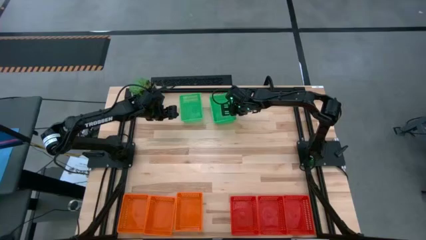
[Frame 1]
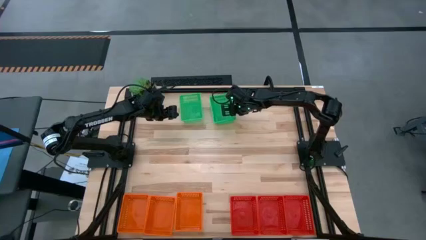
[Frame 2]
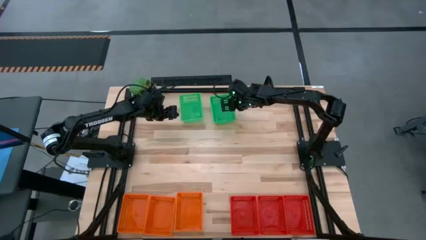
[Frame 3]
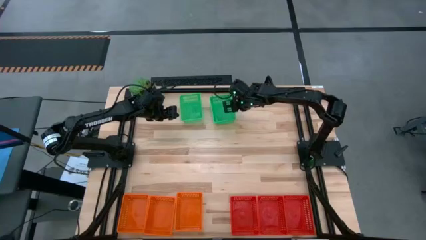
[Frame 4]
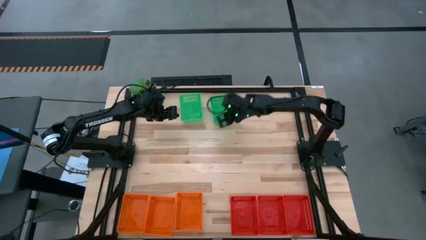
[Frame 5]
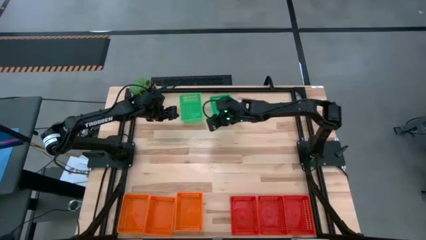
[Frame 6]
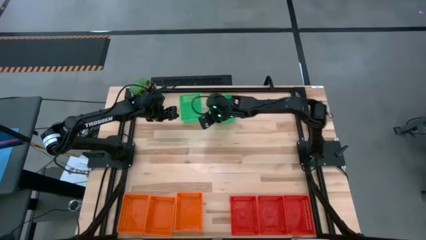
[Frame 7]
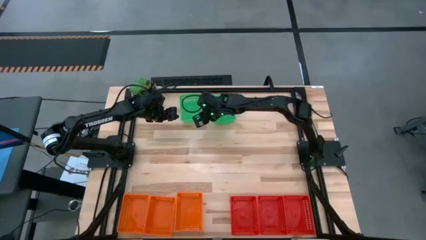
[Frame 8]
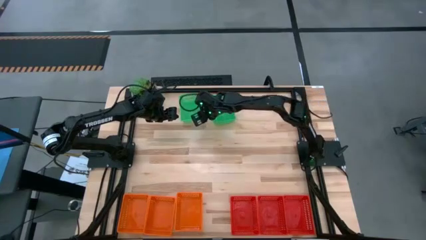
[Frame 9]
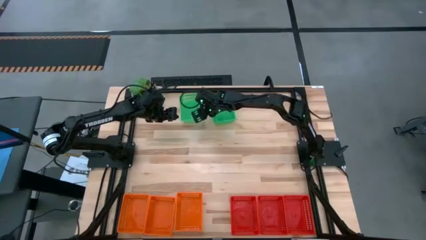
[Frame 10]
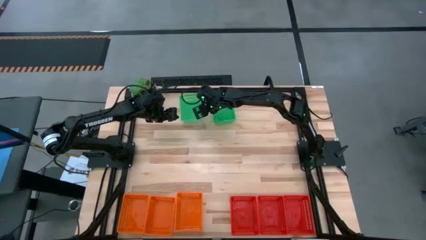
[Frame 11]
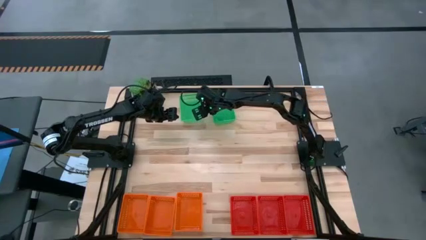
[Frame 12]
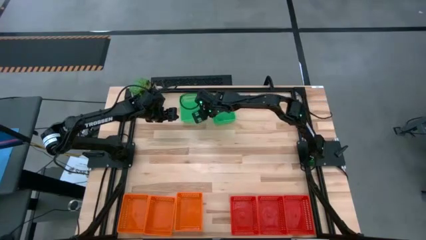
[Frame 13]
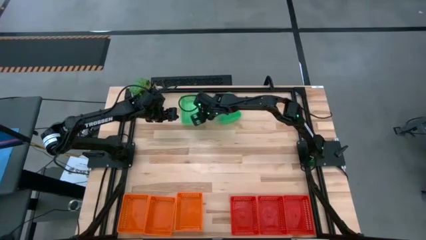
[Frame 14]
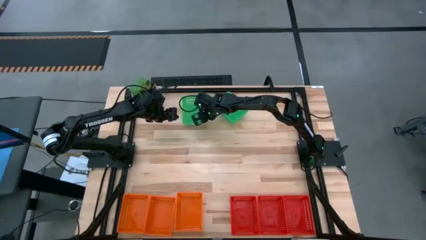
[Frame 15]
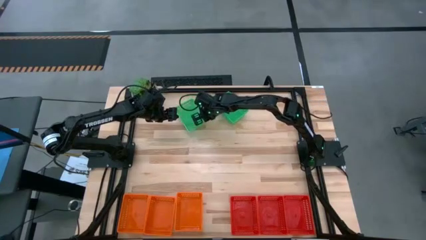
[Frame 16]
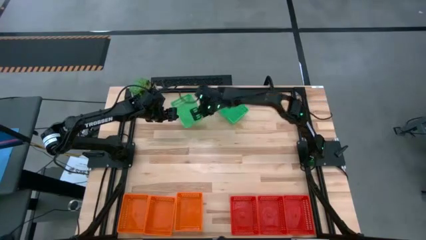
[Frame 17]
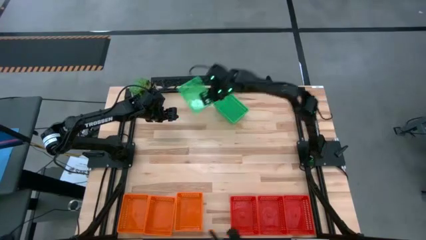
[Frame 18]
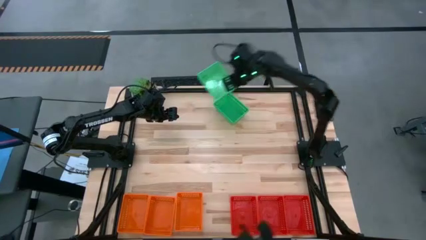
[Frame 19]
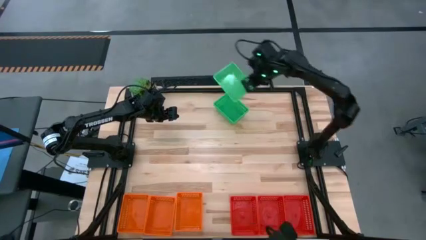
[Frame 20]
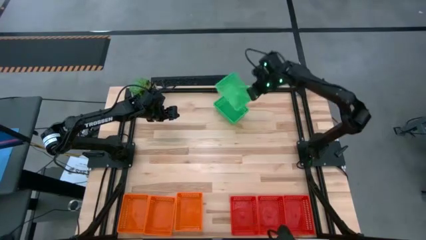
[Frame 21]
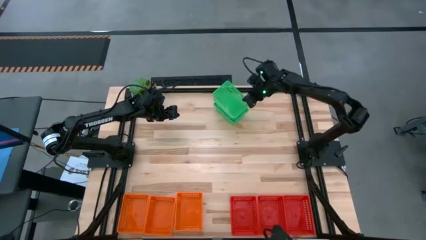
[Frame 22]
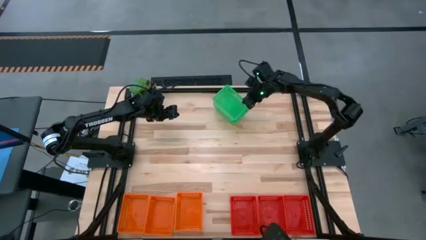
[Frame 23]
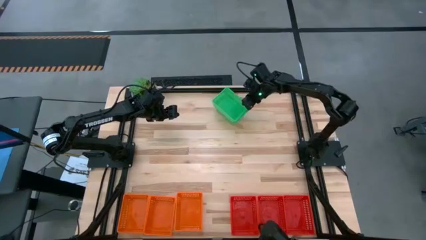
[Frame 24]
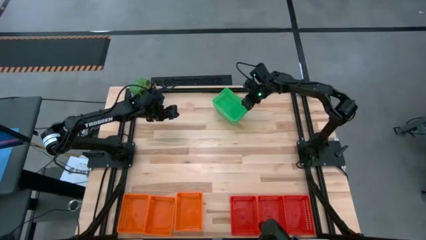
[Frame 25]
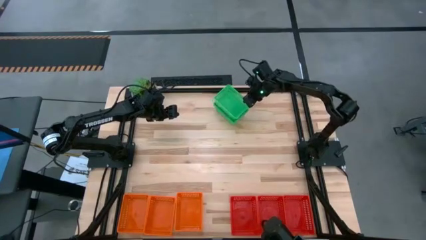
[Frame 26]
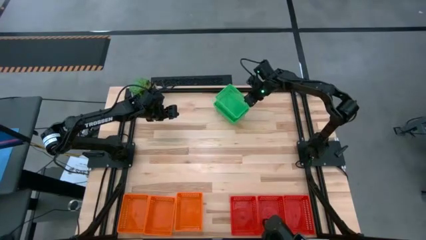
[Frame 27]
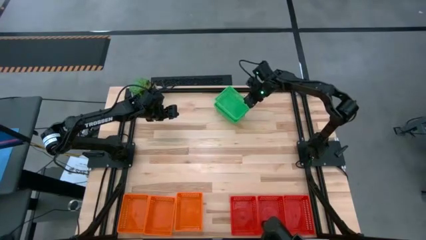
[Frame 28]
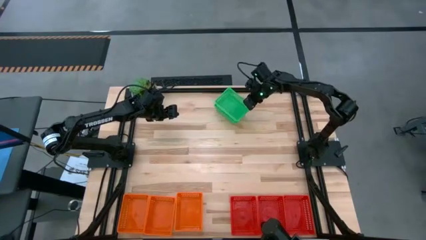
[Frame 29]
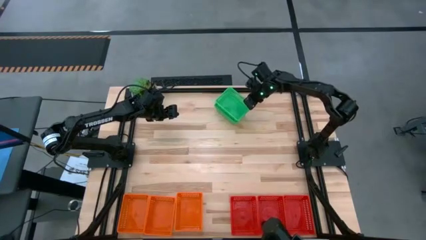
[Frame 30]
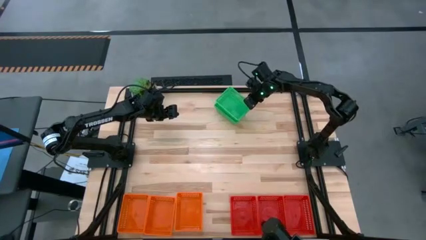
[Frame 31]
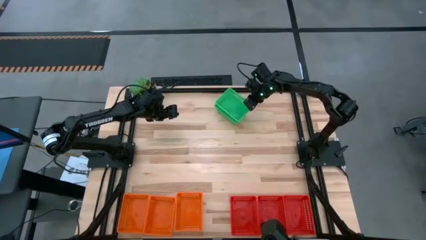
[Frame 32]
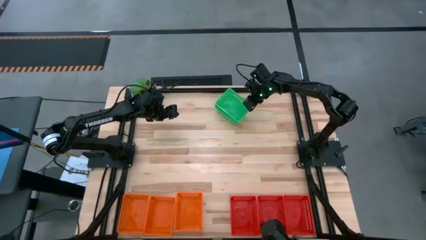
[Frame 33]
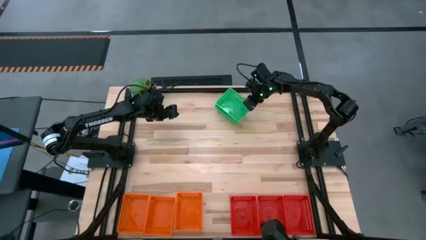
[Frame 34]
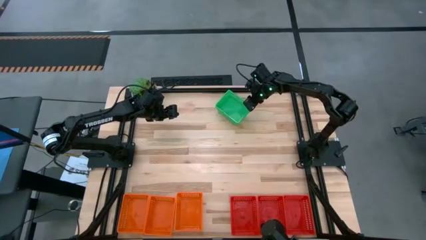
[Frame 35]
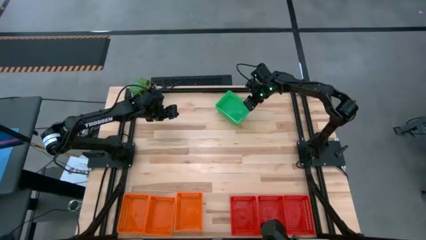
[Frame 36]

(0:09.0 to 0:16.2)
Stack the left green bin on the green bins

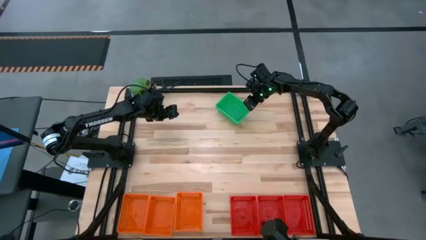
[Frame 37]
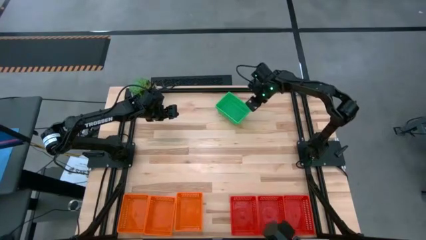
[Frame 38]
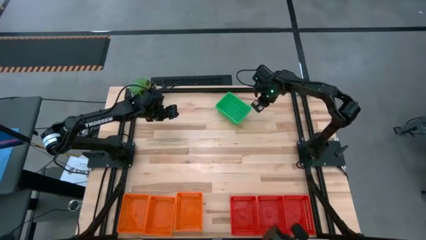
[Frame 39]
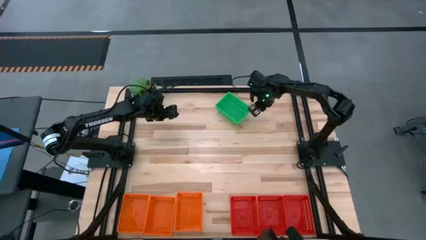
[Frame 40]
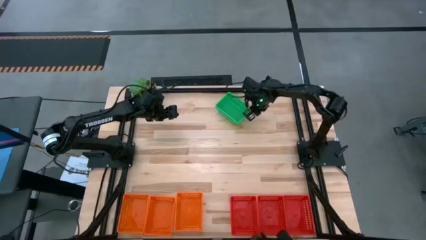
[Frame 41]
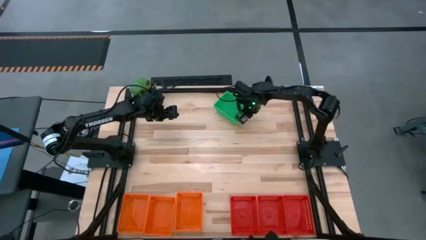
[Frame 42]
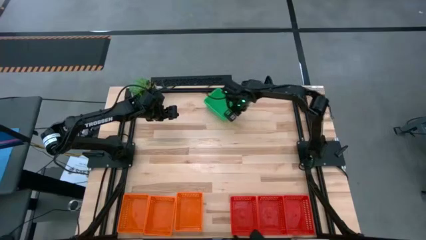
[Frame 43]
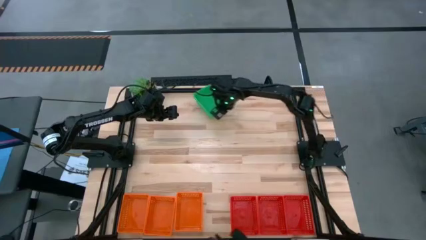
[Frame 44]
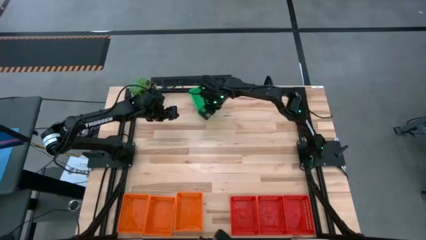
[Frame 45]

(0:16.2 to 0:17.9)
Adjust the stacked green bins

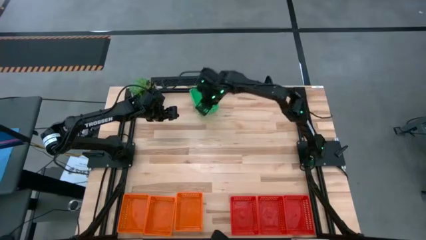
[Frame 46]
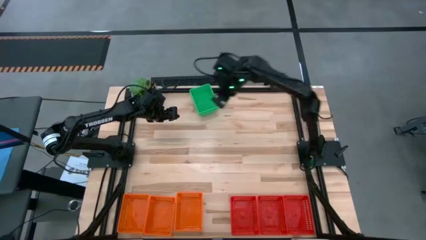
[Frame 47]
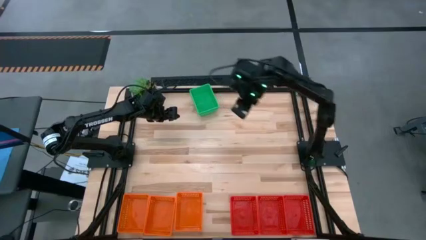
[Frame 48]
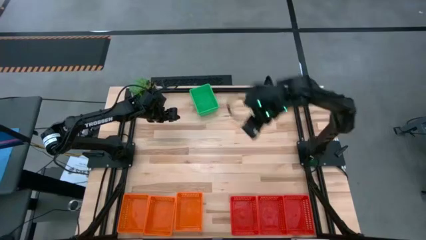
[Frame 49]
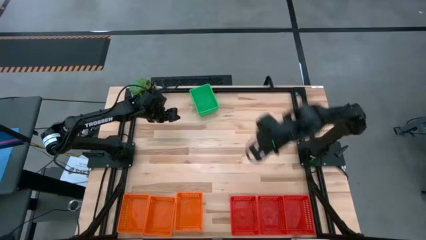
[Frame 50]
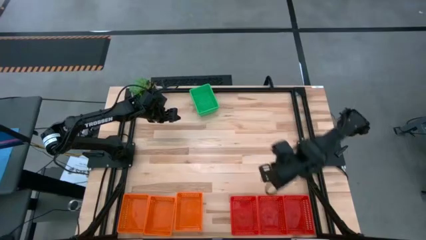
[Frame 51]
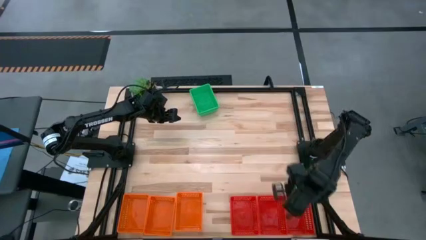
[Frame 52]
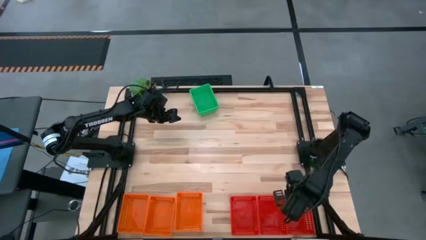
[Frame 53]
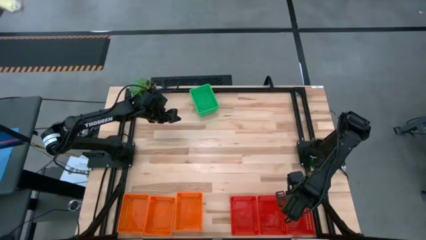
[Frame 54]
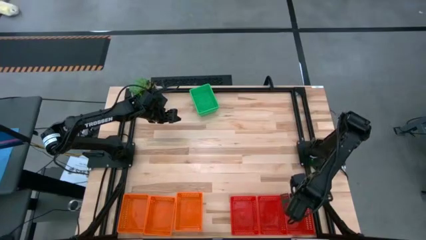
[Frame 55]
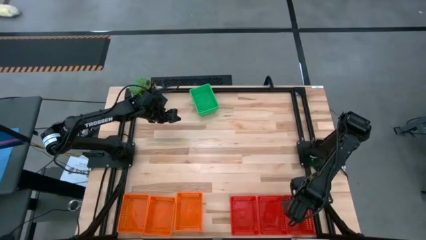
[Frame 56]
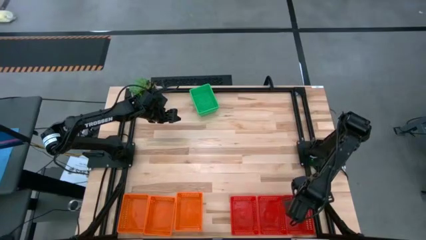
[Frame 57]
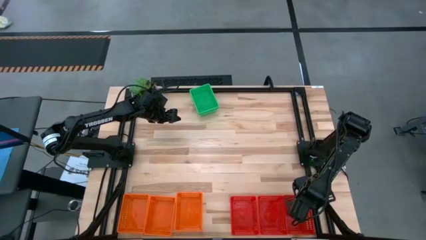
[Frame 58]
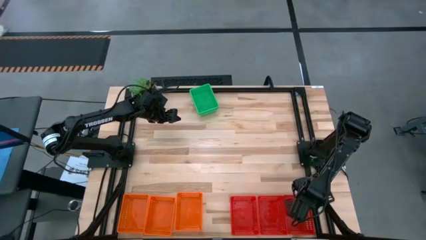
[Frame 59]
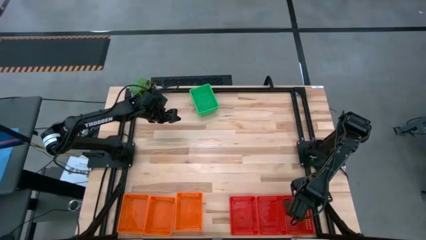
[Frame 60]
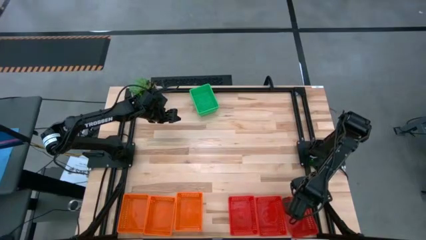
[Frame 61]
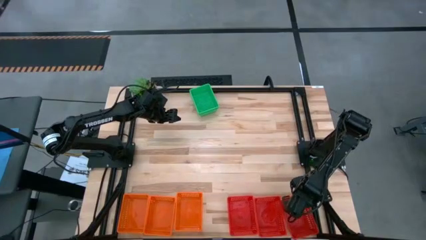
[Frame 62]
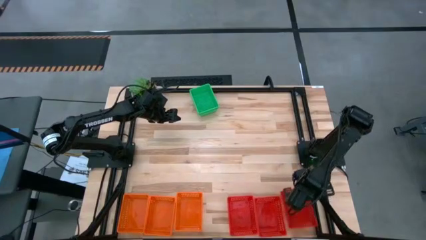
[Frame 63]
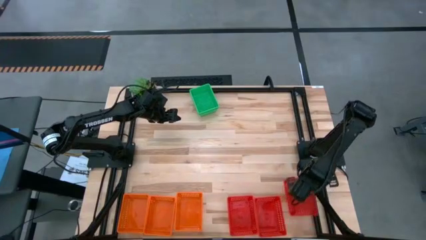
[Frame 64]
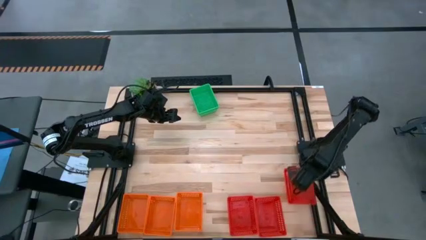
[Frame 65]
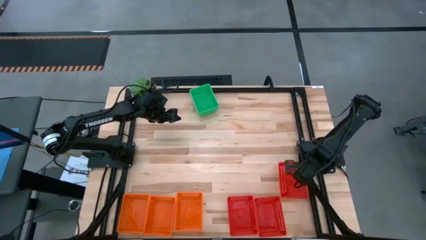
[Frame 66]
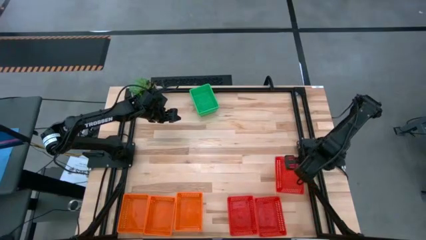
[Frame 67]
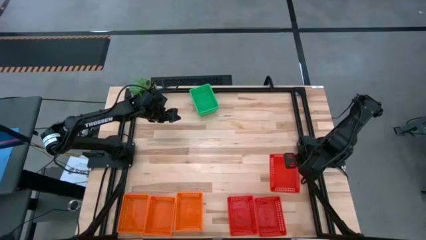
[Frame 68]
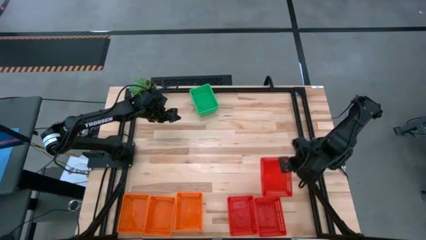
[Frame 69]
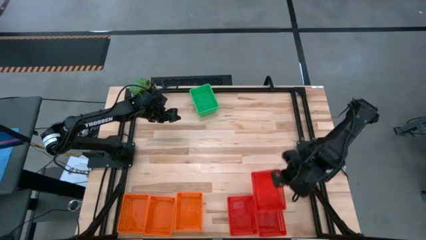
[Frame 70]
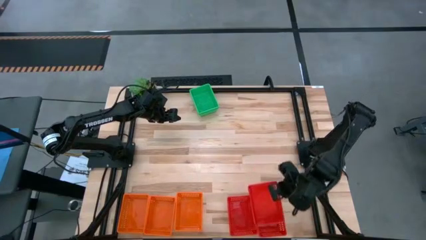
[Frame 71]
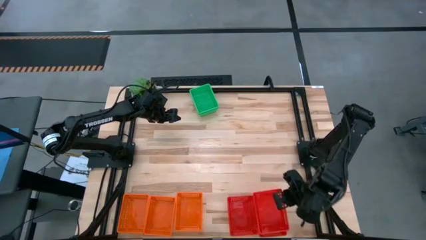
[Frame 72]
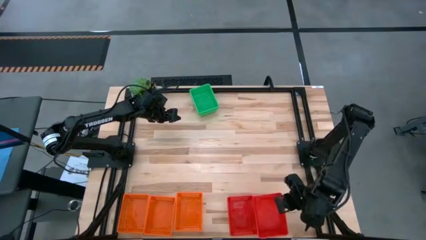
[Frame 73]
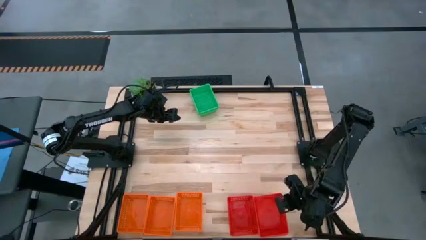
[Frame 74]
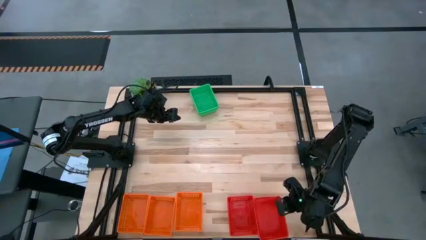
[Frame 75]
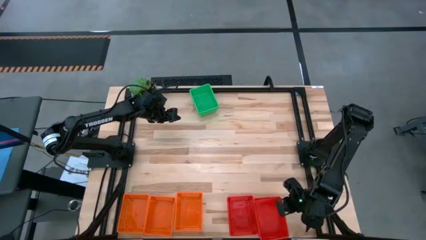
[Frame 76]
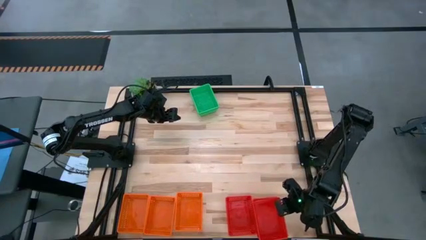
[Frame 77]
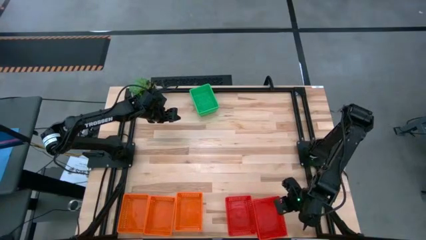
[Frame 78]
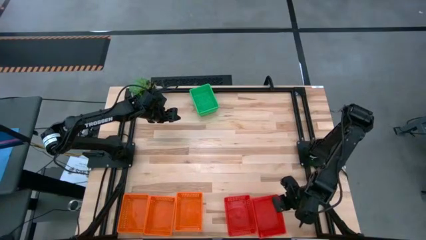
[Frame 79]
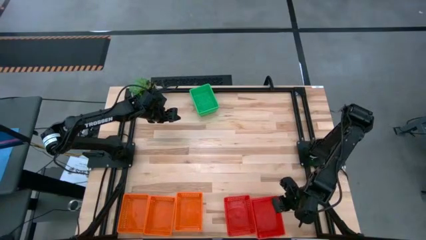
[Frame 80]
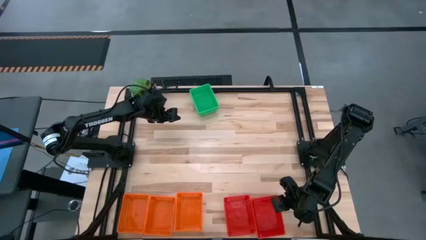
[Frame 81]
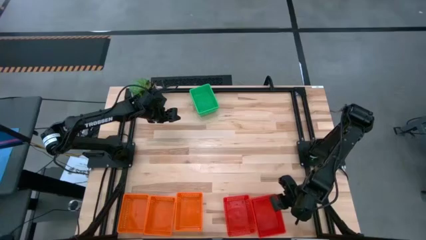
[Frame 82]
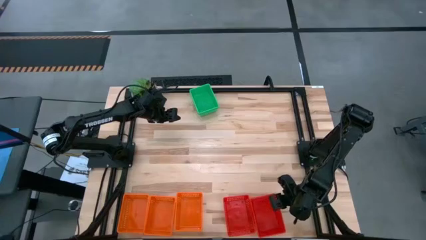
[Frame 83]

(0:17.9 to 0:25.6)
Stack the bottom right red bin on the middle red bin
